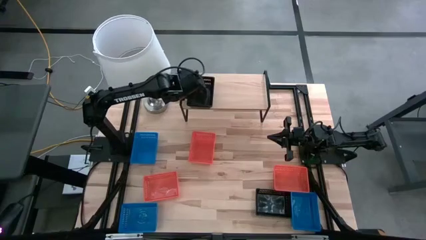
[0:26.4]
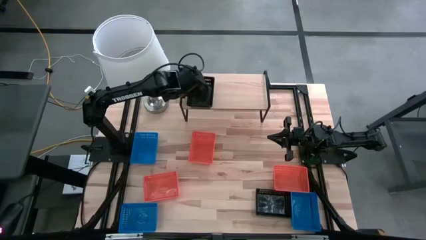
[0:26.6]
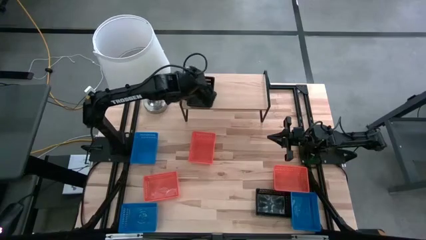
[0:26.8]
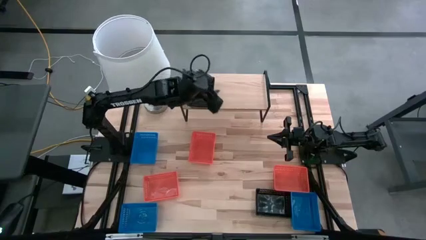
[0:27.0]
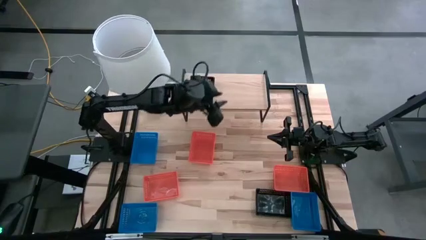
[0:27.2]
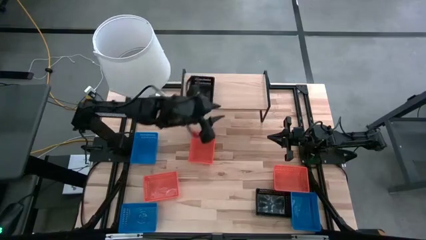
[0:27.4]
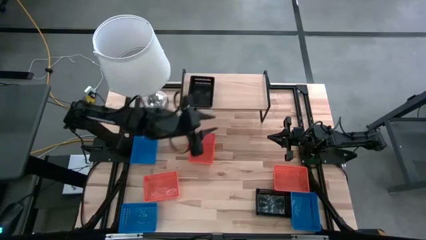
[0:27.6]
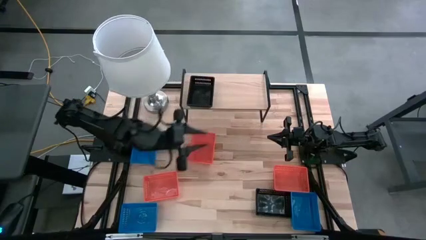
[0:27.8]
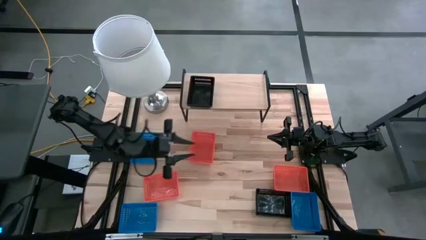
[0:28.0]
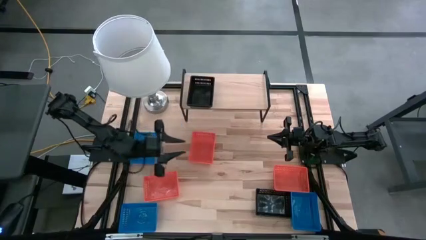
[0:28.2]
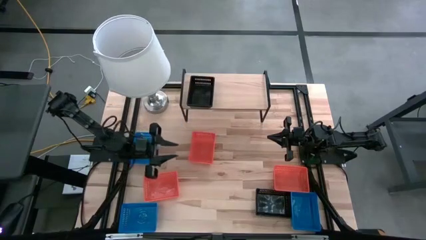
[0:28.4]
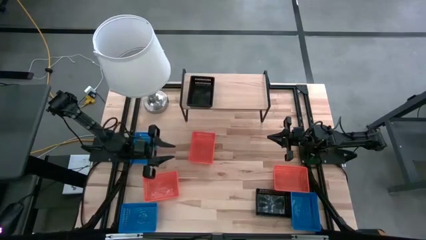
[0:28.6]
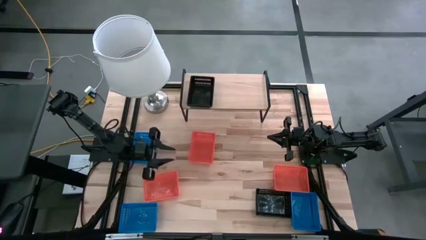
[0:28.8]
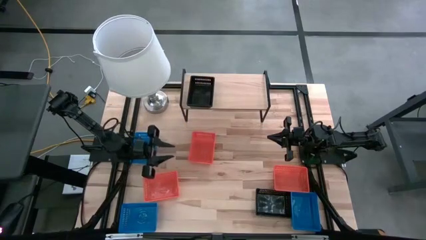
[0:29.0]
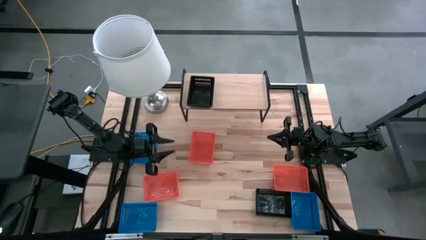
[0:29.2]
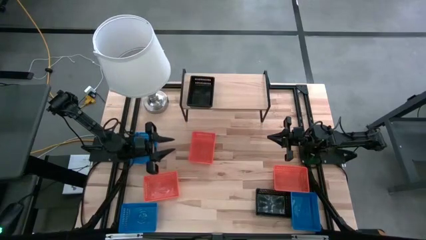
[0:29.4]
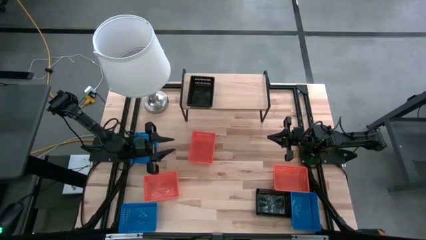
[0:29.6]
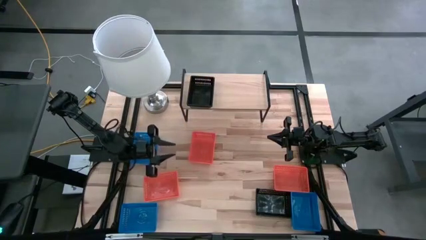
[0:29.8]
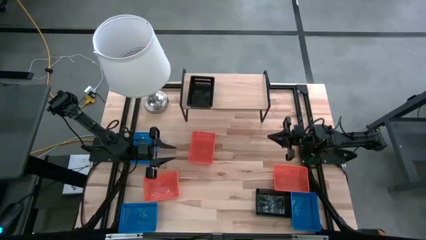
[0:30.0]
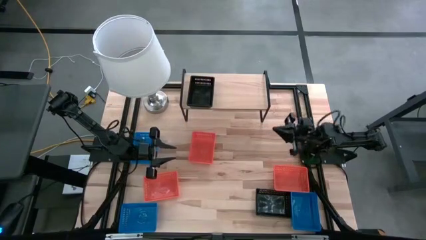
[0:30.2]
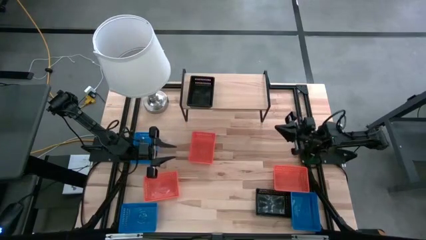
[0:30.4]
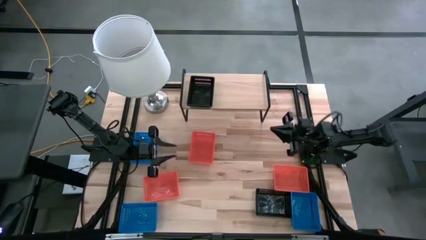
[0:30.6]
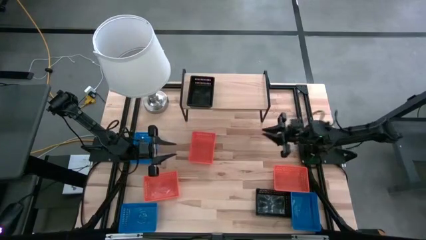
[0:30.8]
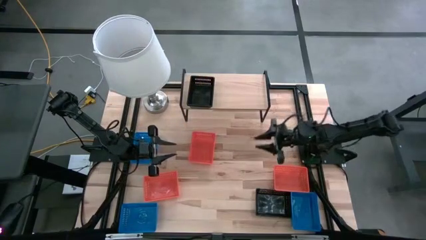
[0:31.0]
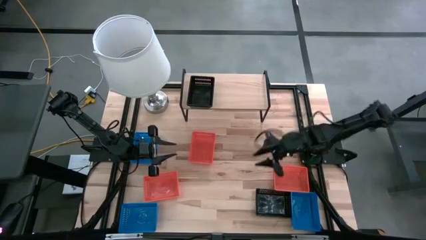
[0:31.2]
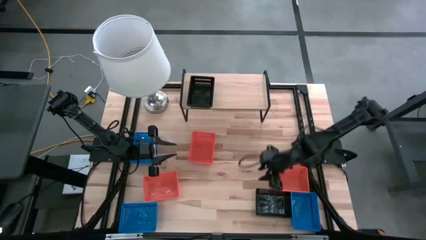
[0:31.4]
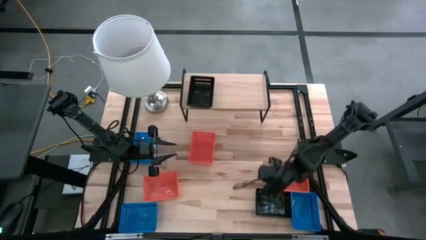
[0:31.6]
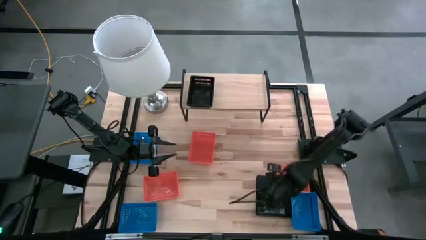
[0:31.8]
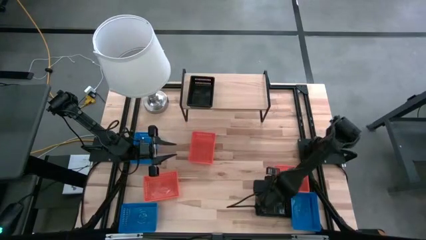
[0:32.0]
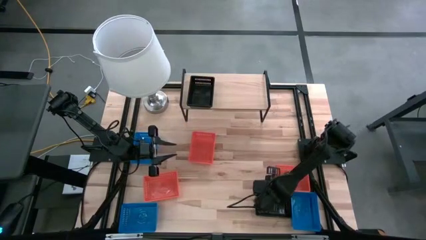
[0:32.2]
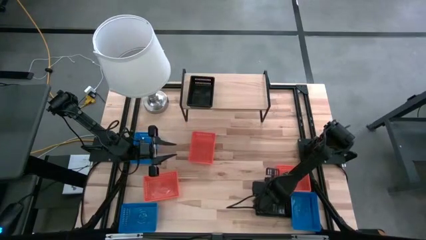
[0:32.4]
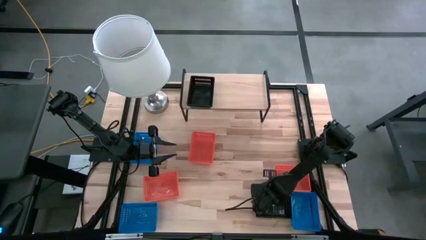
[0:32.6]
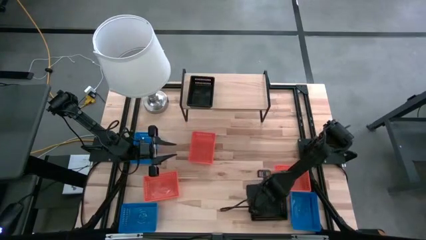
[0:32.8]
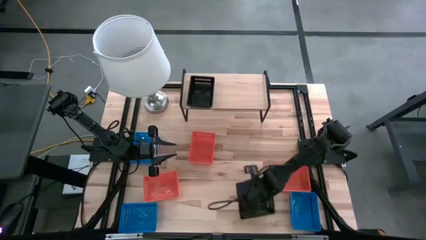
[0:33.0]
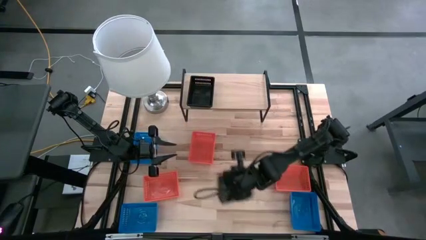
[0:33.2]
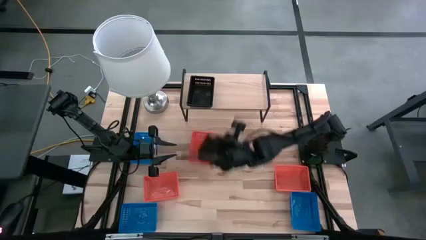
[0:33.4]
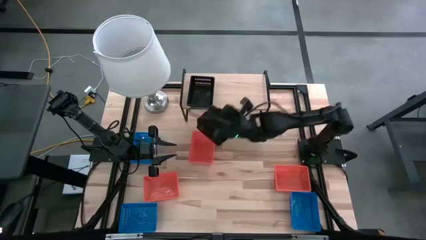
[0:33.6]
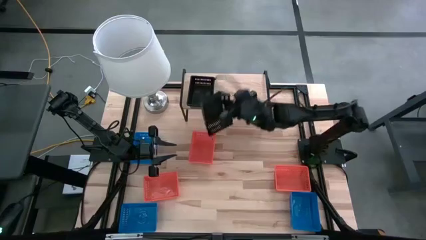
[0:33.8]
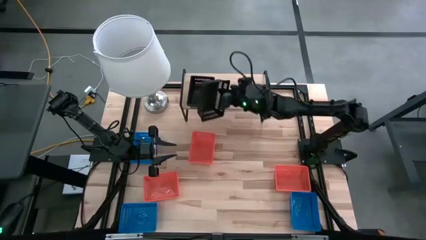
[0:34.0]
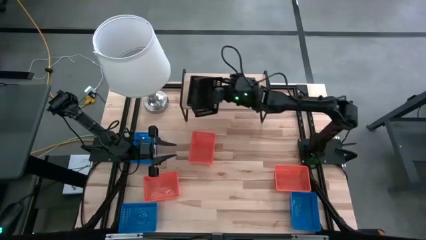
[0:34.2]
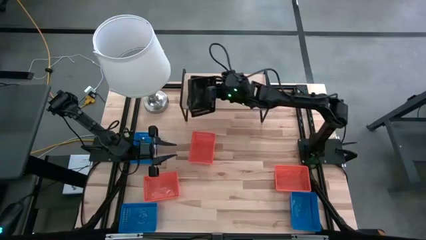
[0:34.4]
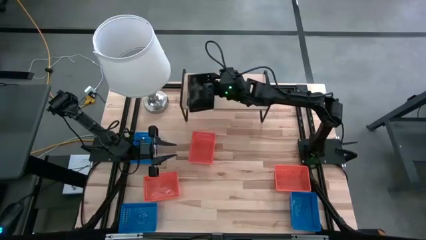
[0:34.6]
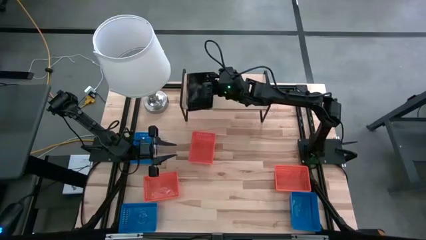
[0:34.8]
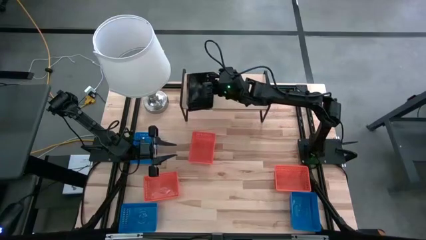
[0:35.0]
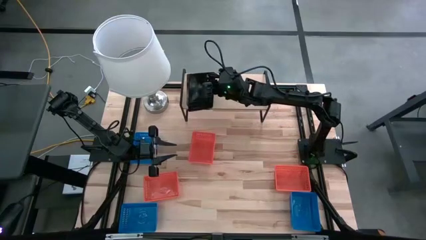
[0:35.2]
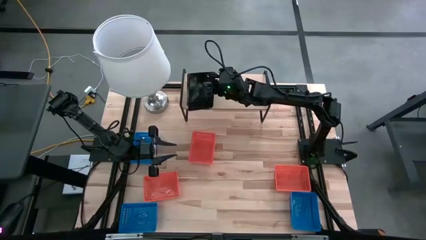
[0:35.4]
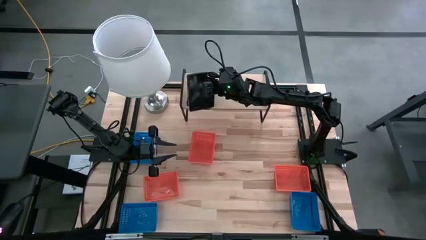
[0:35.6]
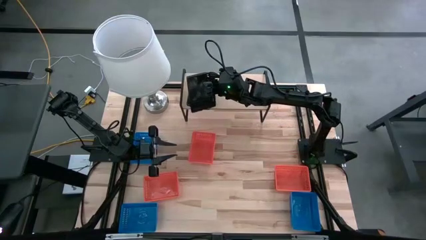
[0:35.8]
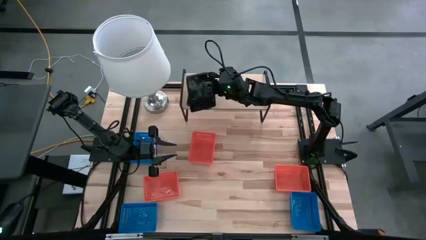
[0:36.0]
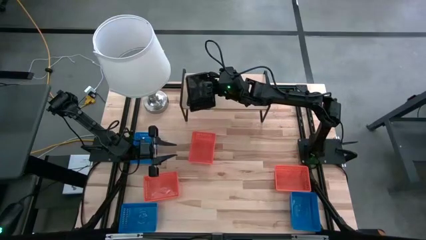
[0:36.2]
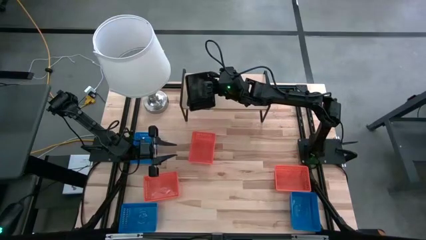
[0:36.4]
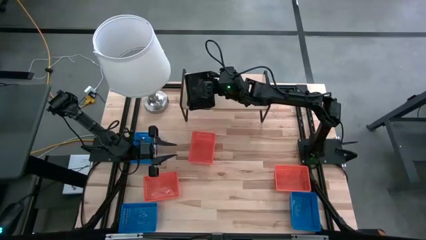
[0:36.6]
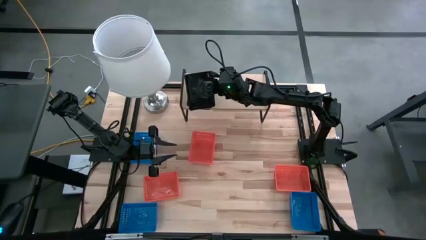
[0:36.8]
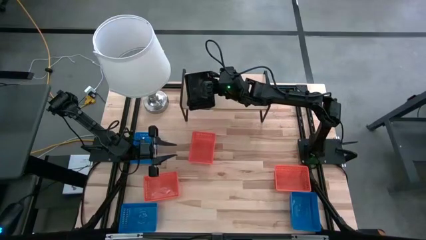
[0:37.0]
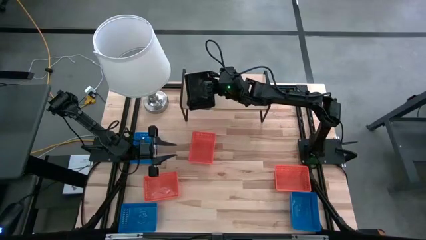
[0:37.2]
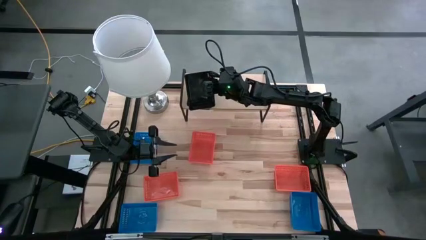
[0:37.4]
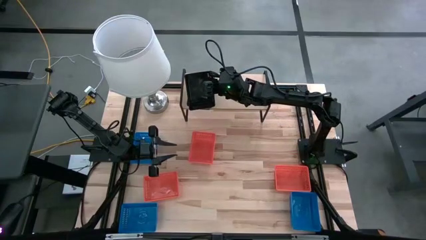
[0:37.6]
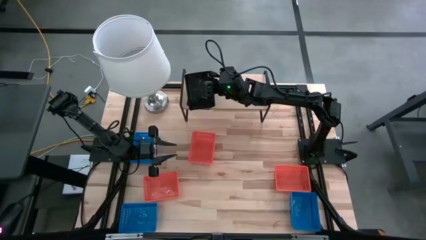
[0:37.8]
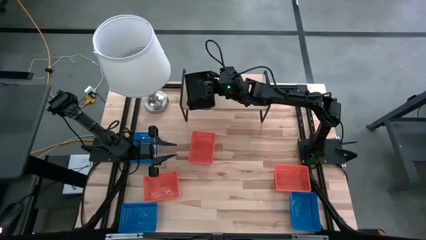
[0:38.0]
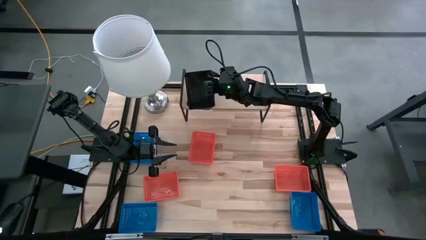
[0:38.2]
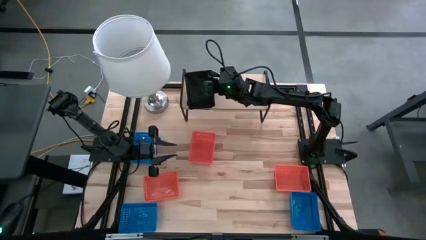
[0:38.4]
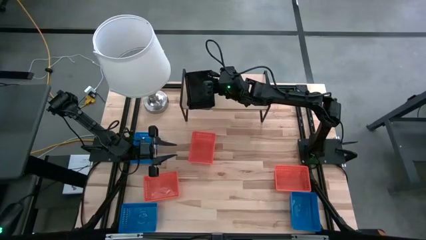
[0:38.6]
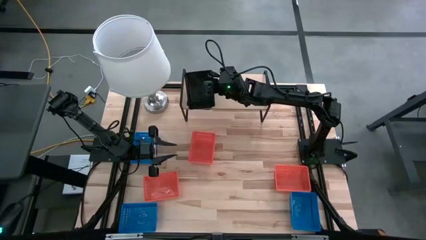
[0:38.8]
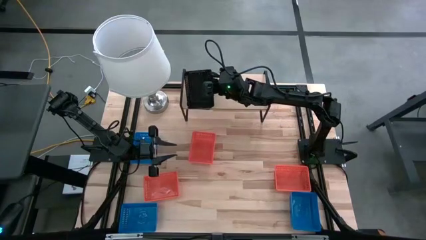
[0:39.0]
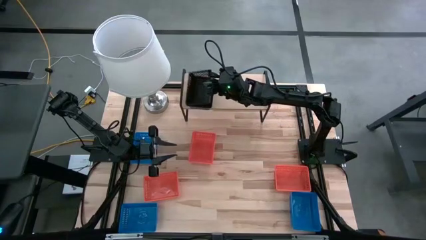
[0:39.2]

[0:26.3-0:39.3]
Task: Stack baskets on shelf by color
Stack the black bin on top of the black bin on the shelf

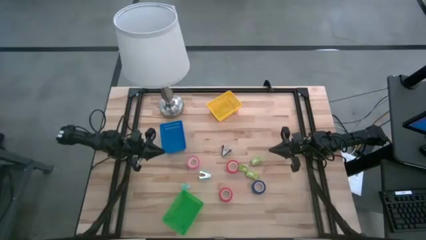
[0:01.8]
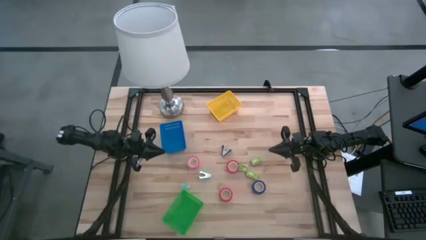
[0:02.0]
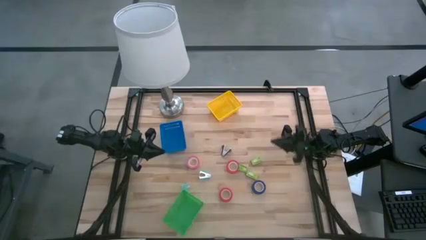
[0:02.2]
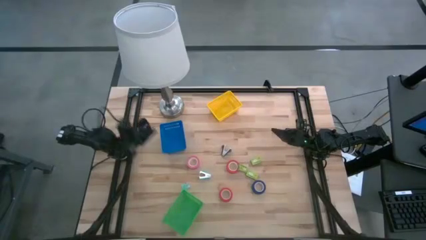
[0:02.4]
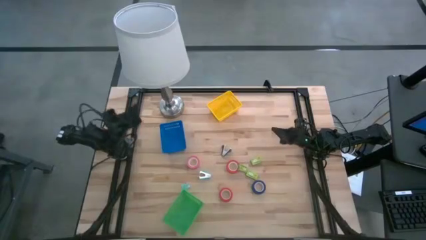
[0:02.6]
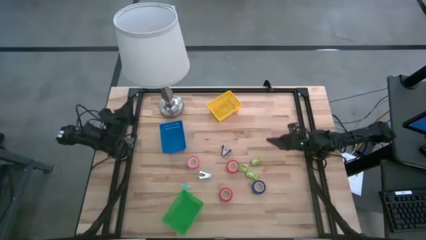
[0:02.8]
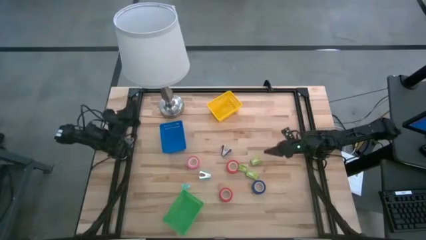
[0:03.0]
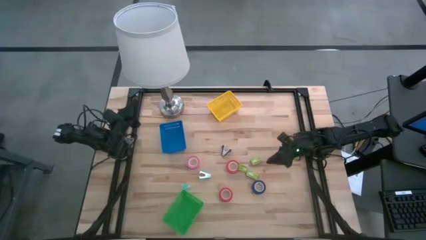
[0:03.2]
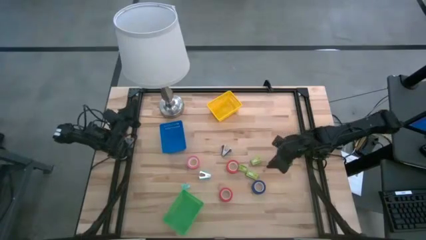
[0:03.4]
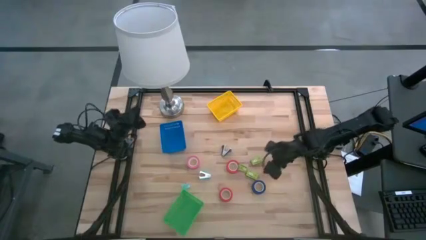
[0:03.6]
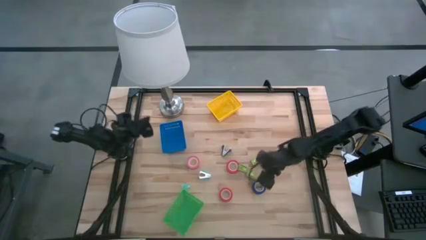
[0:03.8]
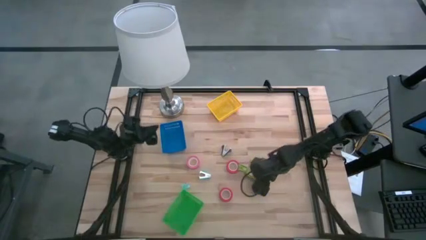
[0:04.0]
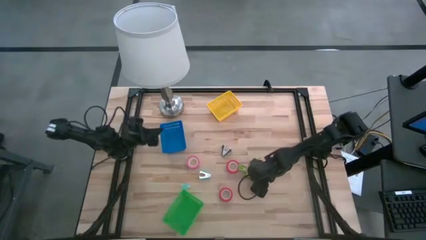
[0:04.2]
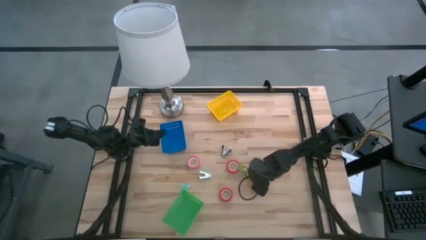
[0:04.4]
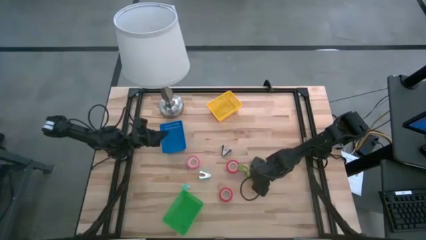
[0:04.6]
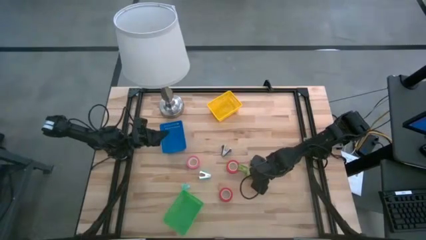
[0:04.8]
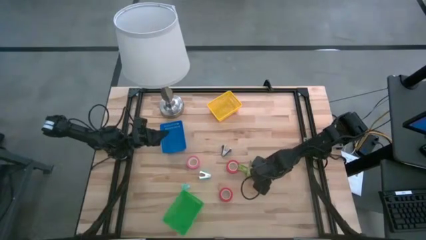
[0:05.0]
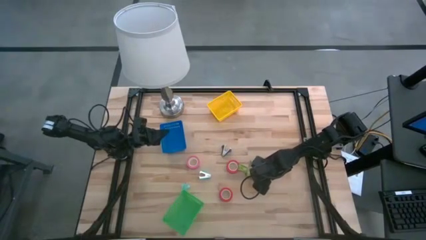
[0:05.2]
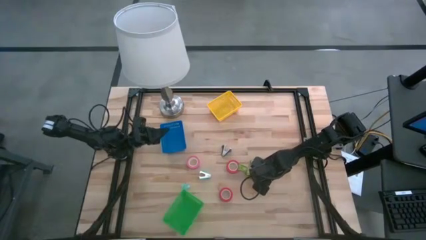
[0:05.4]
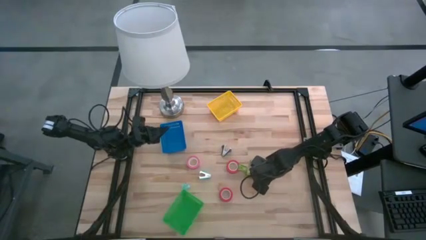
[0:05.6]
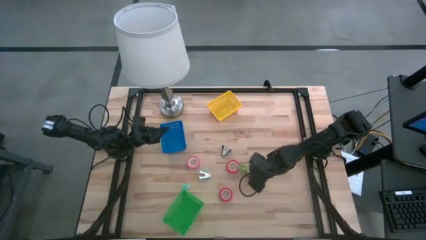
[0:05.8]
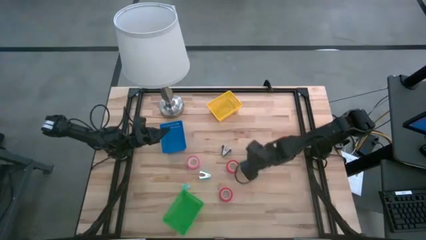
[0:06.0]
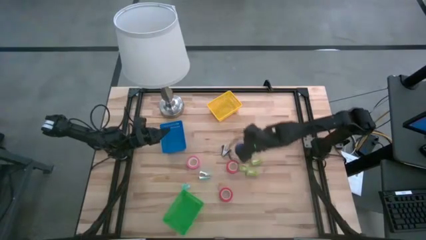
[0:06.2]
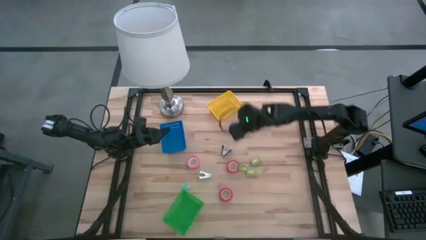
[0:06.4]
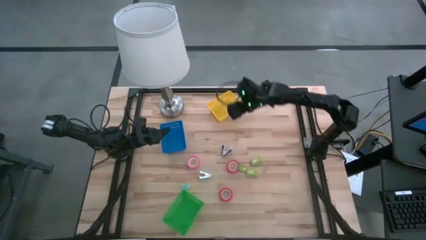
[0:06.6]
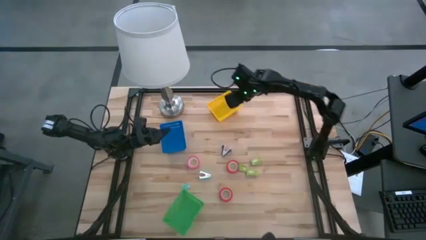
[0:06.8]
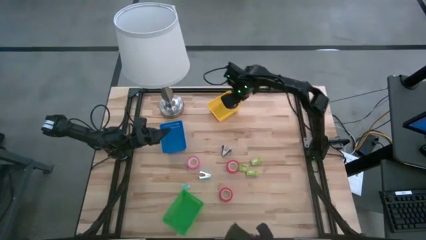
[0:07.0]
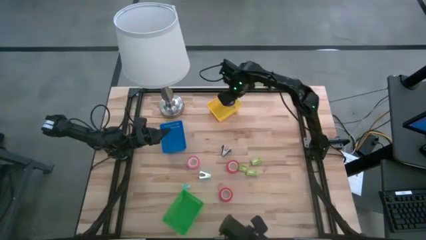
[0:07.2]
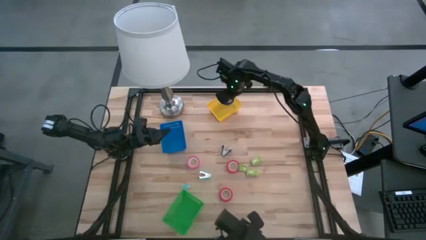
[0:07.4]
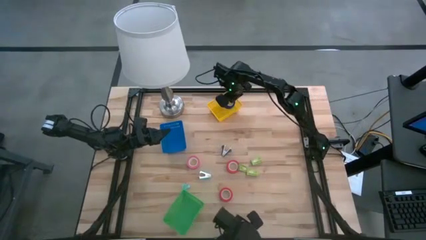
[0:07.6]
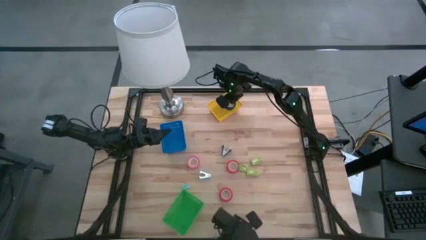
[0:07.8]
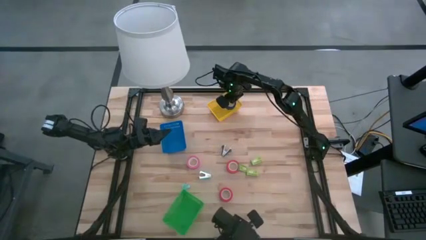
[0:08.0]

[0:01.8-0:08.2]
Task: Pick and place Stapler, Stapler remover, tape
Put the blue tape into the yellow bin
